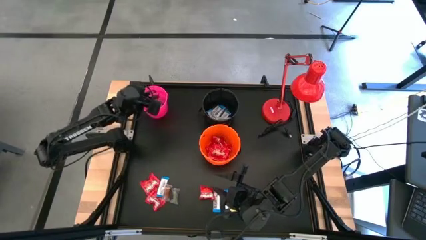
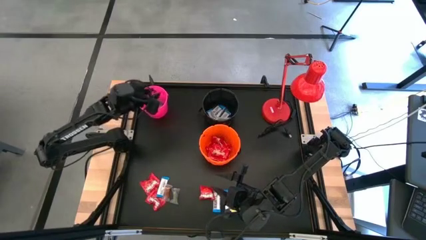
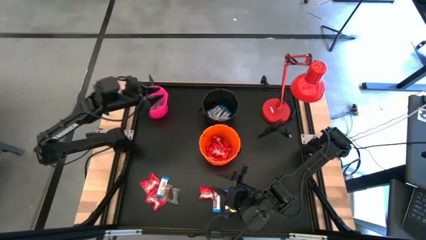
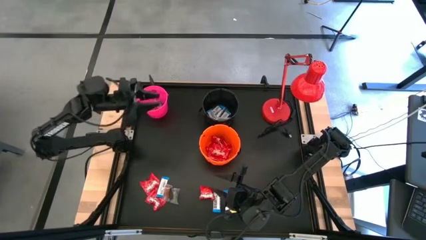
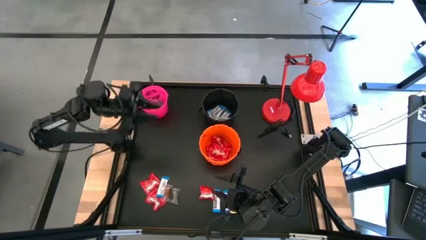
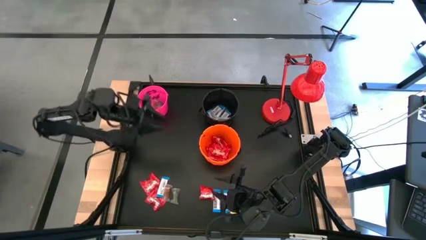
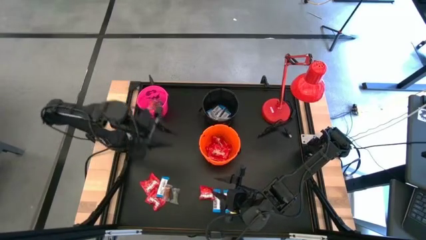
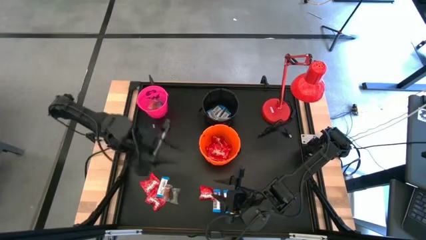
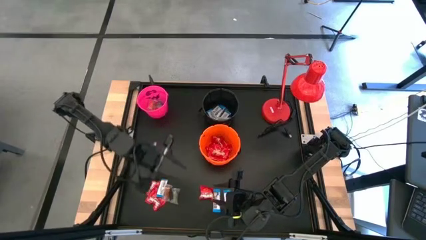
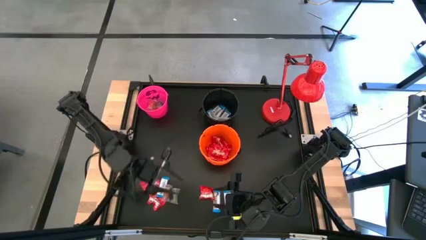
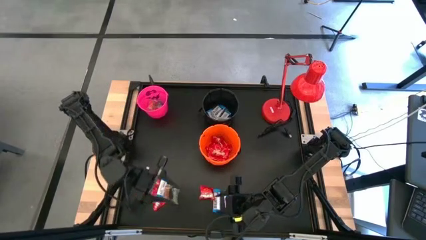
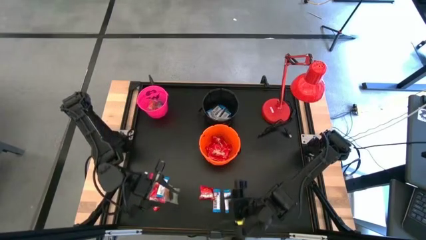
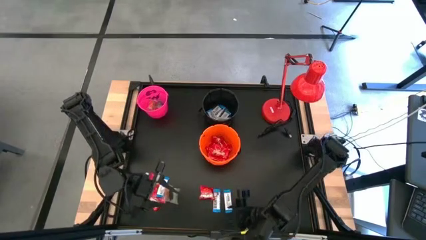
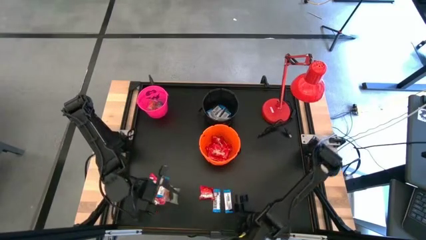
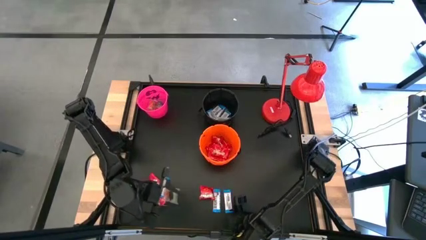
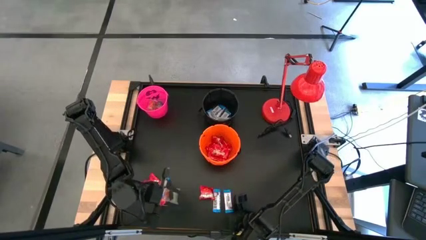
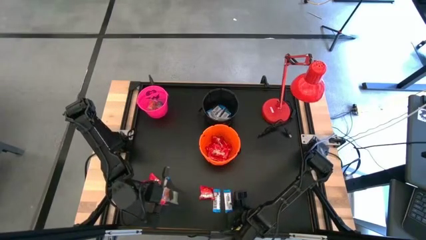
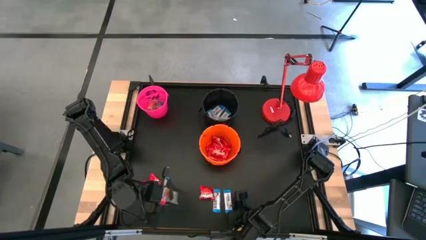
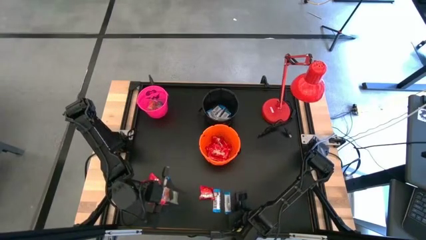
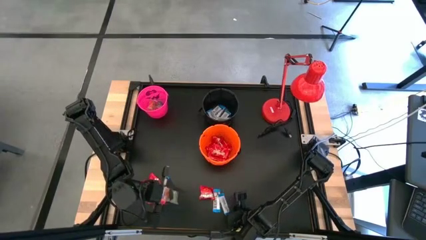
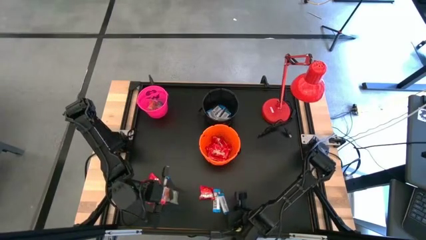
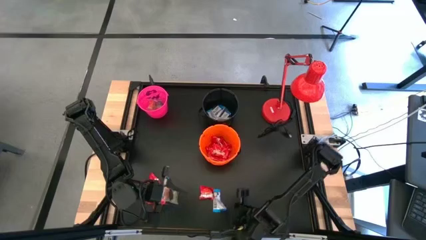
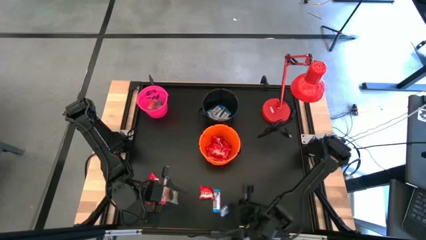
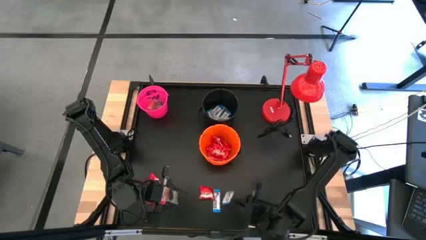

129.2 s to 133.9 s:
Task: Sort candy
Put the white chocolate into the black bucket

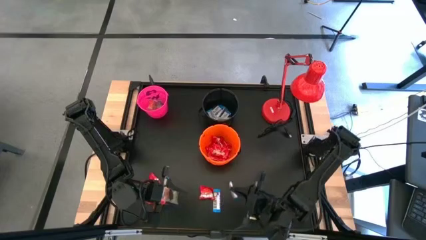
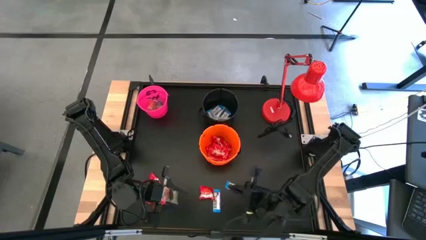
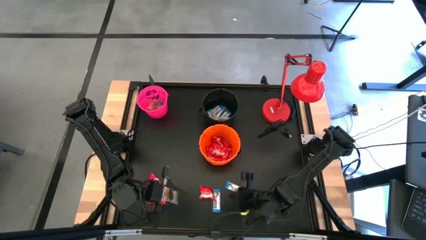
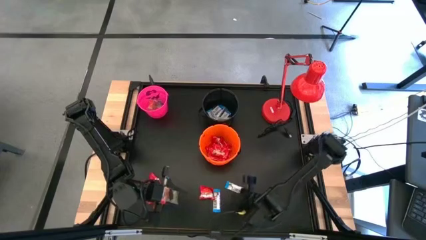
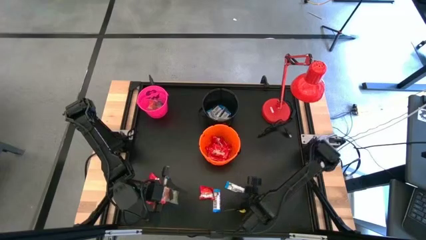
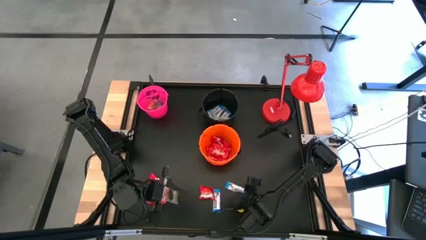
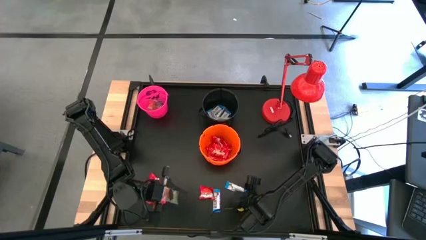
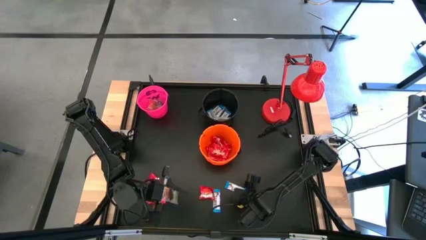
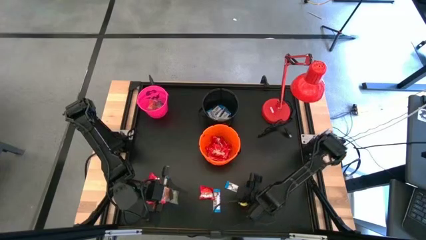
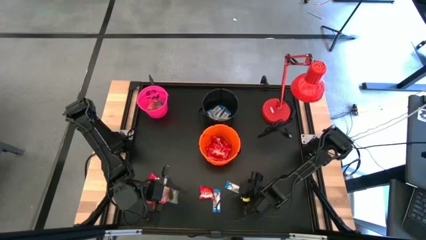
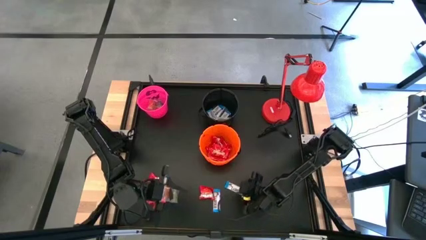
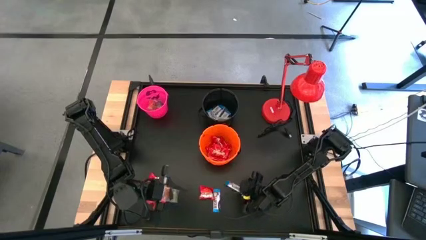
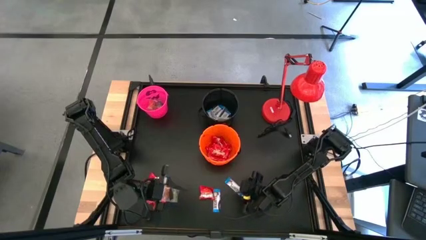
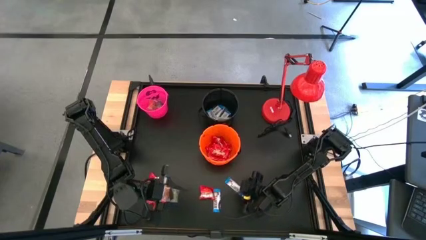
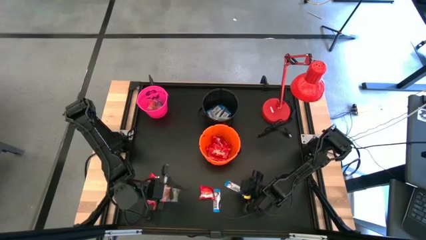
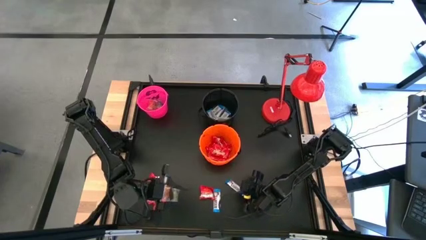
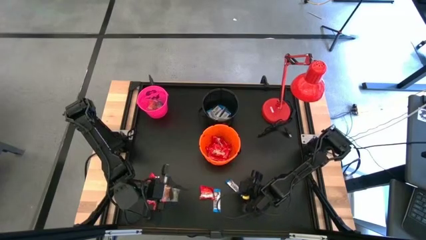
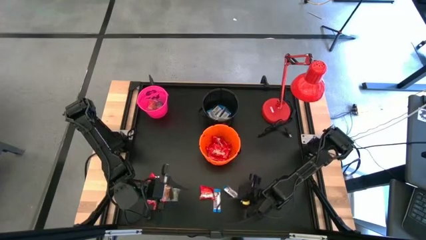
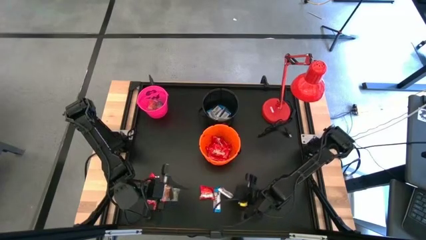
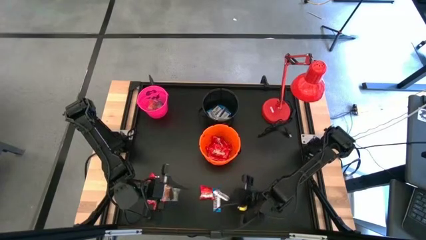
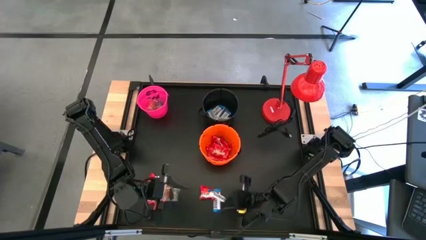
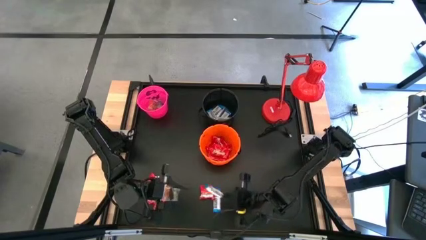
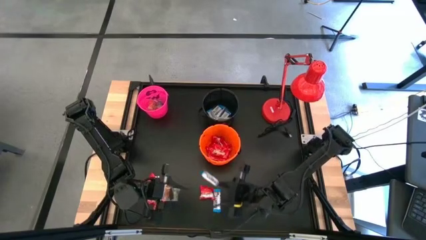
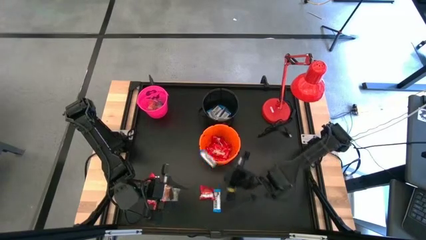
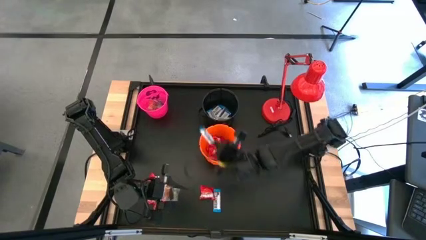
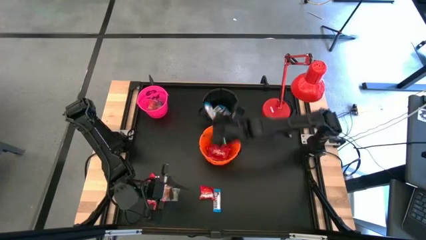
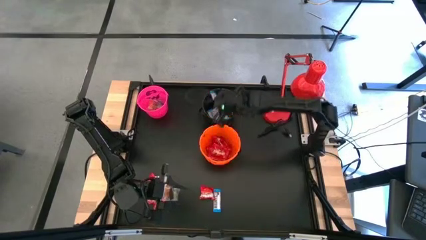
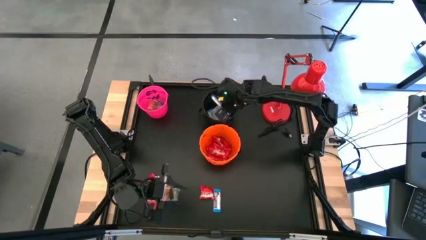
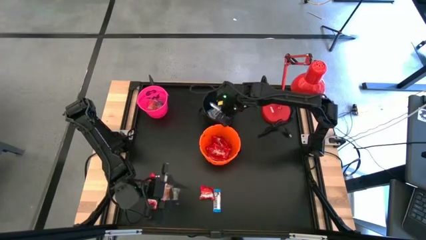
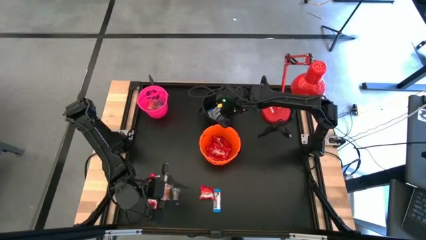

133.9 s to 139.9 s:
Put the white chocolate into the black bucket

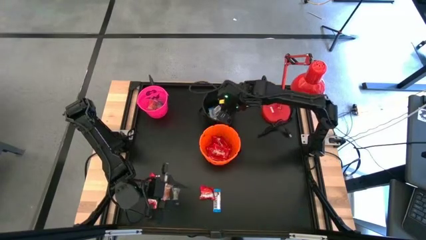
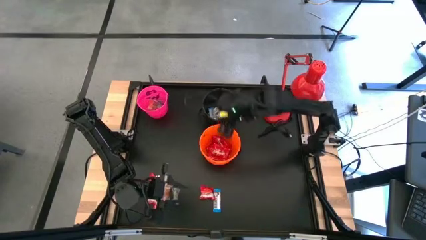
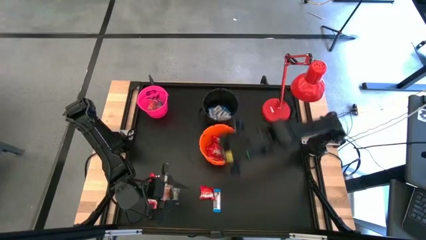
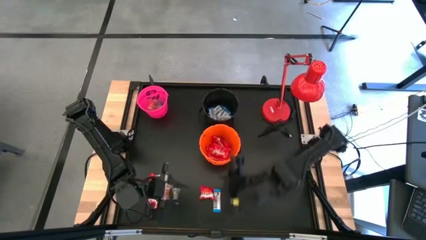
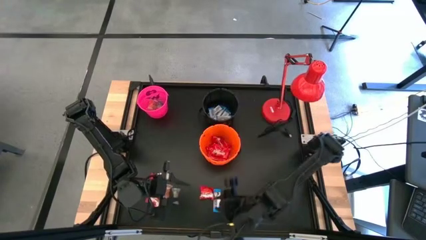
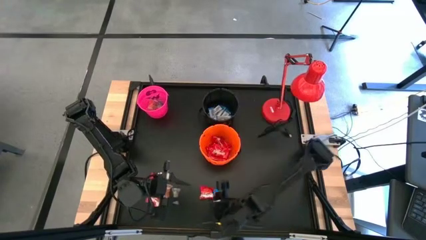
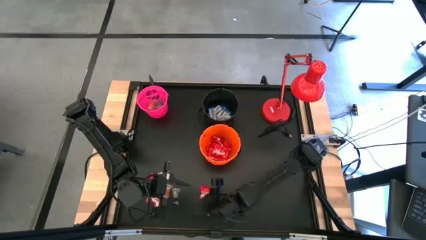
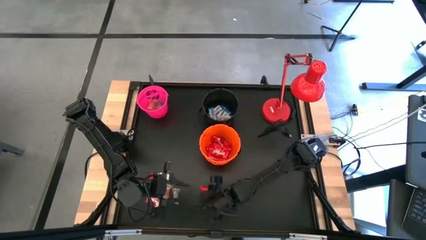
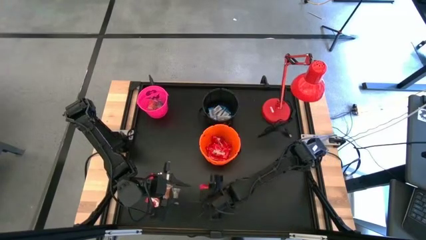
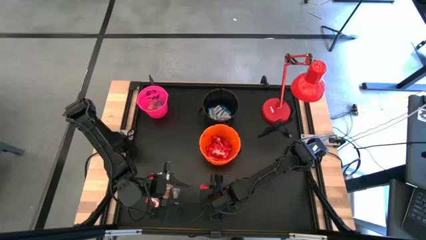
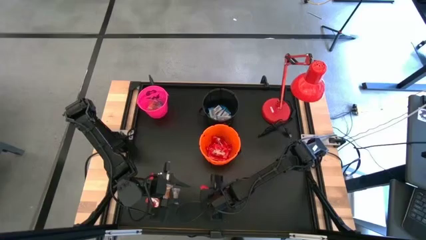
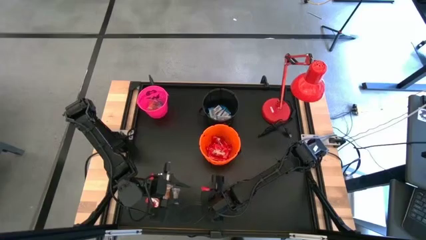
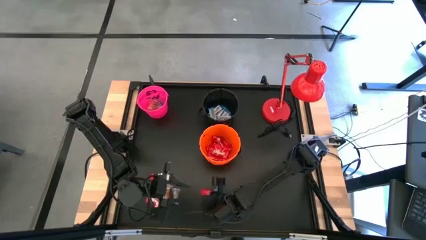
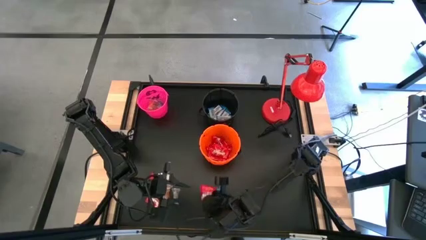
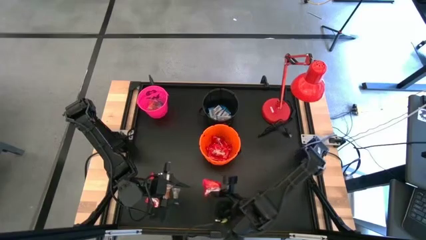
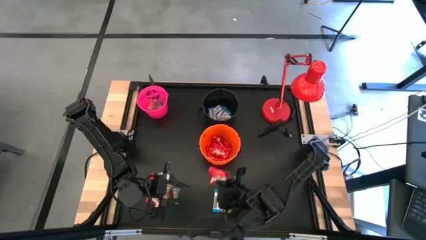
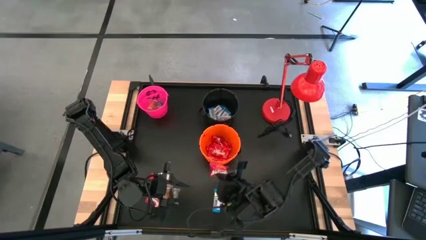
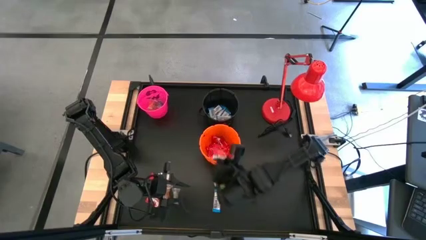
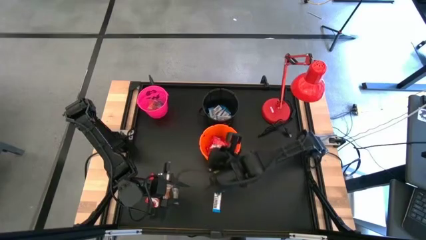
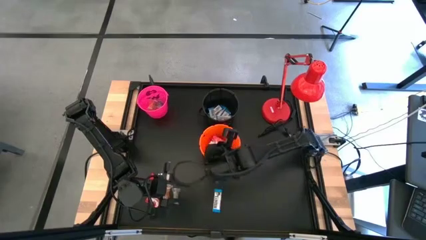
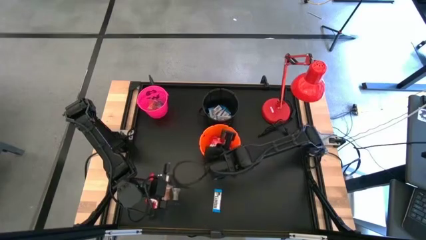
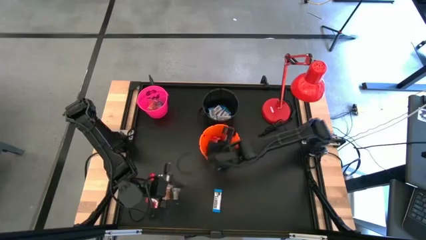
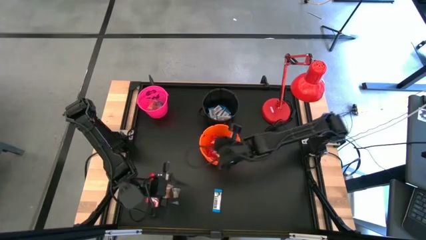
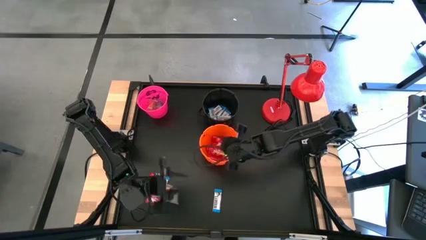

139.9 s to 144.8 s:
Put the red candy into the orange bucket

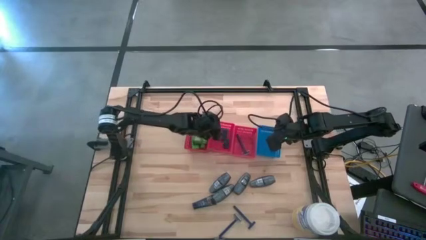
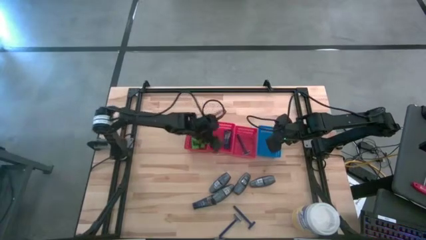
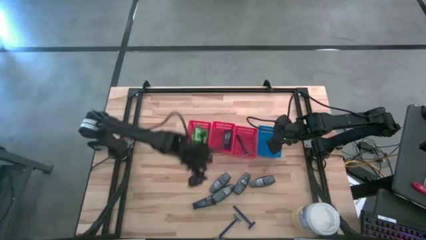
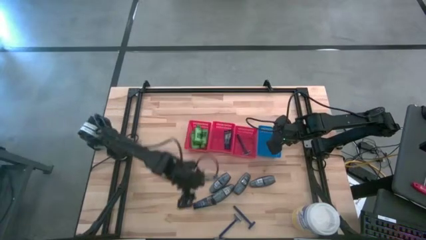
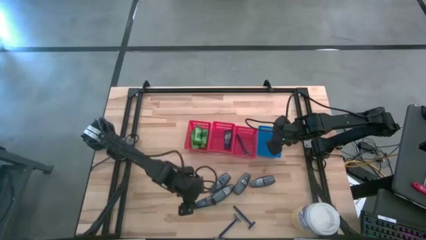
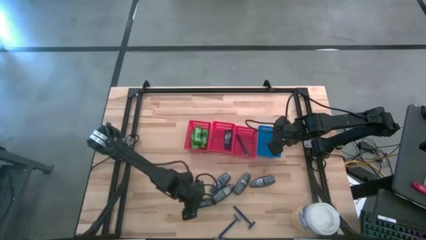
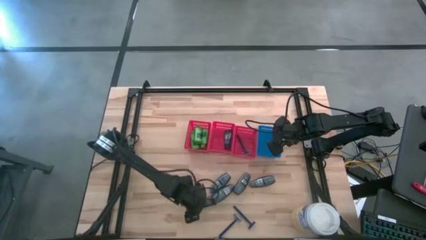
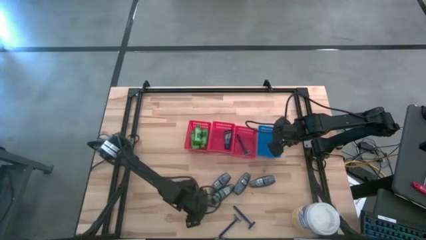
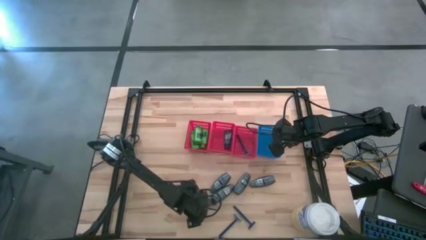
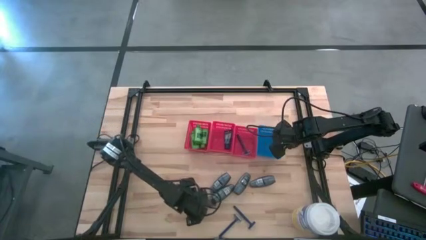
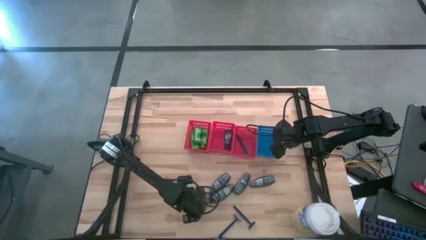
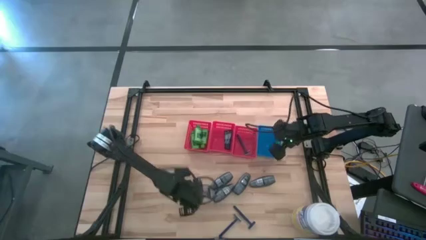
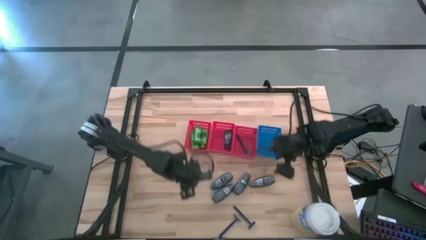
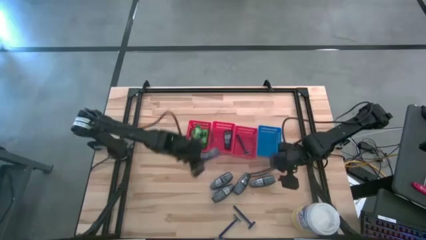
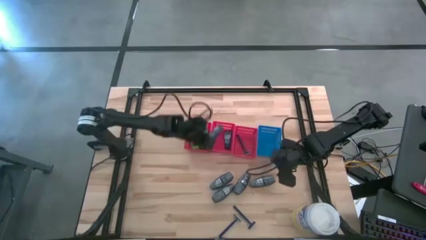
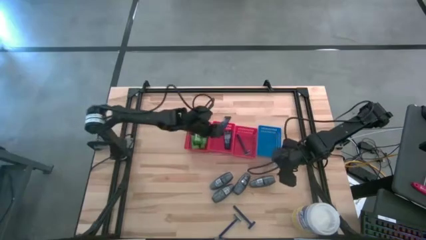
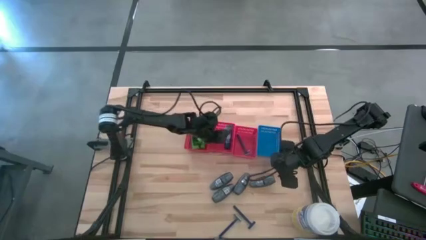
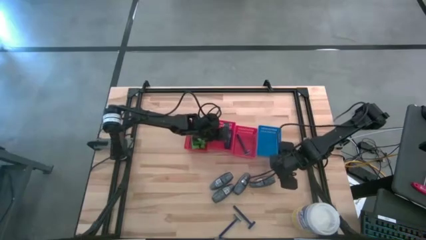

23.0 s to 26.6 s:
Task: Pick & Place Travel size toiletries
Put the blue shave cream in the middle red bin
